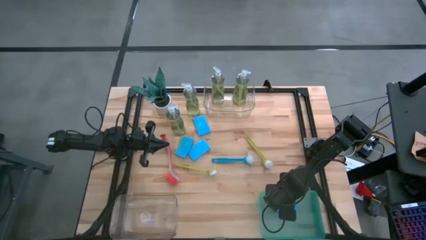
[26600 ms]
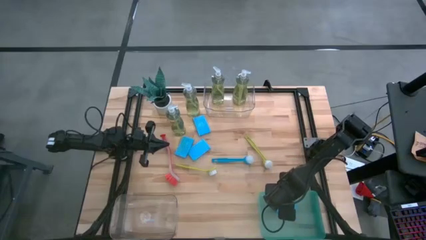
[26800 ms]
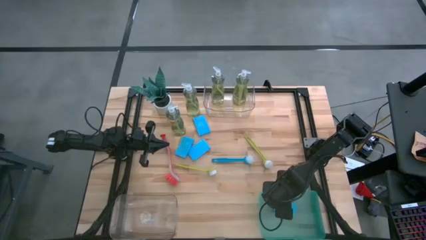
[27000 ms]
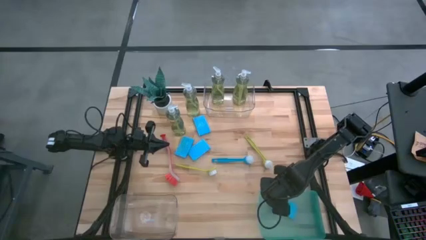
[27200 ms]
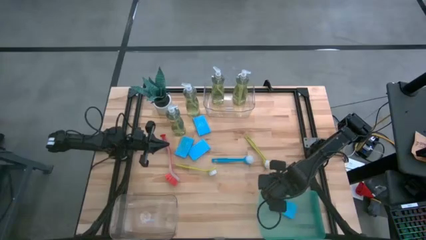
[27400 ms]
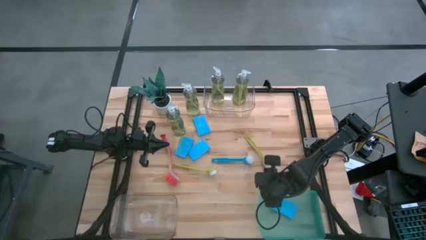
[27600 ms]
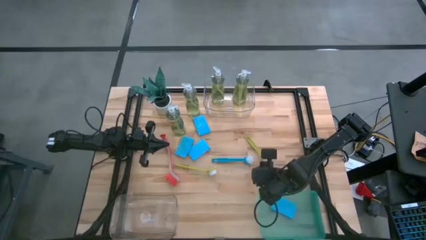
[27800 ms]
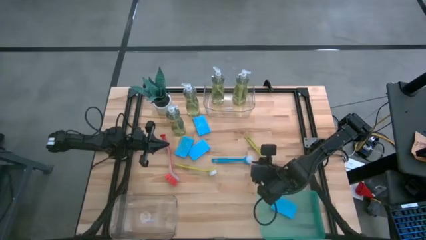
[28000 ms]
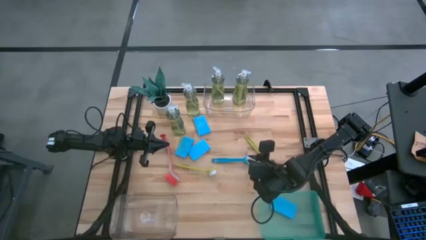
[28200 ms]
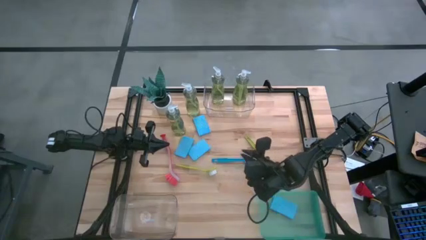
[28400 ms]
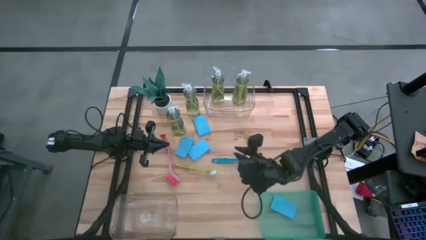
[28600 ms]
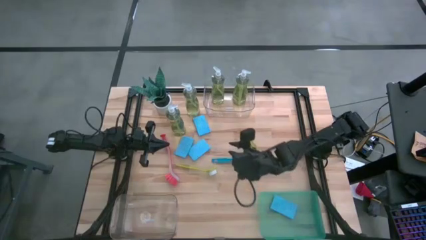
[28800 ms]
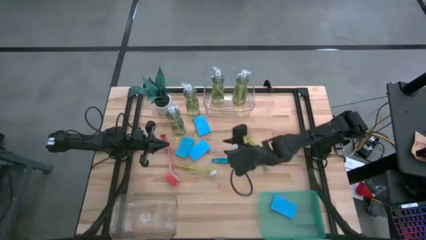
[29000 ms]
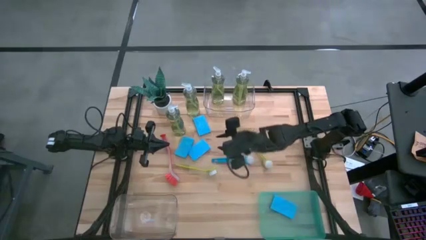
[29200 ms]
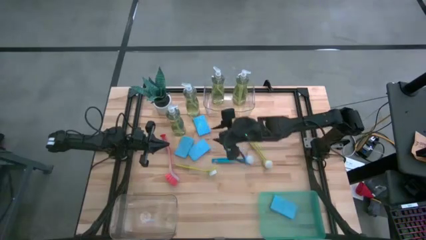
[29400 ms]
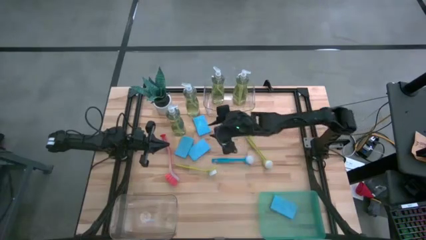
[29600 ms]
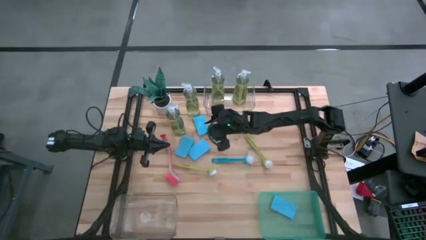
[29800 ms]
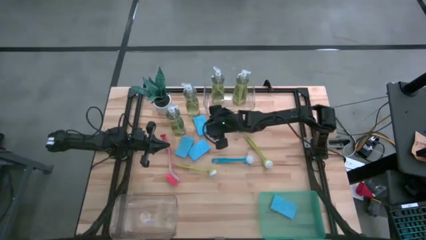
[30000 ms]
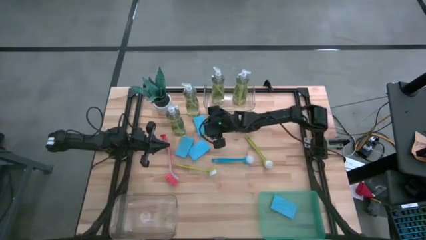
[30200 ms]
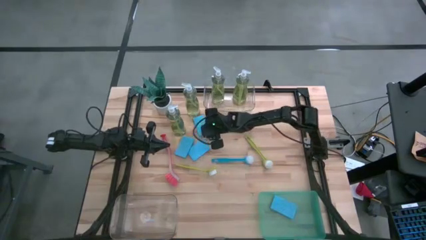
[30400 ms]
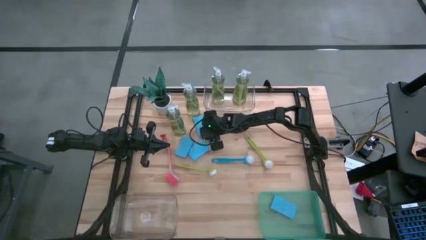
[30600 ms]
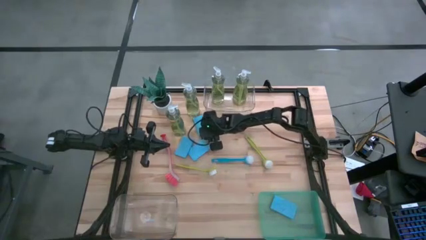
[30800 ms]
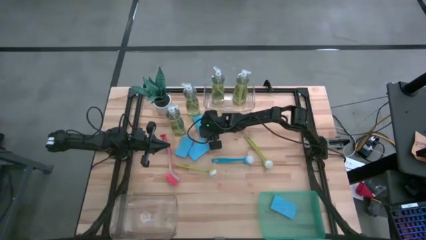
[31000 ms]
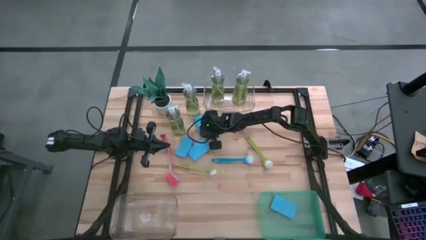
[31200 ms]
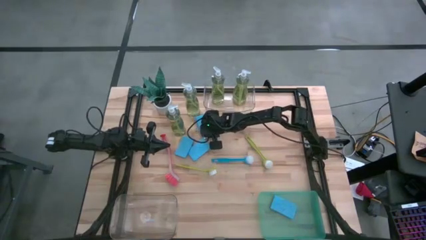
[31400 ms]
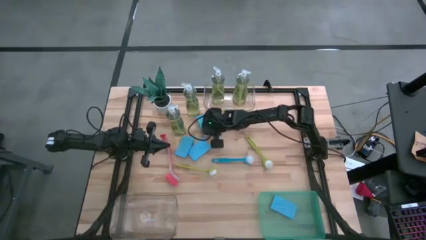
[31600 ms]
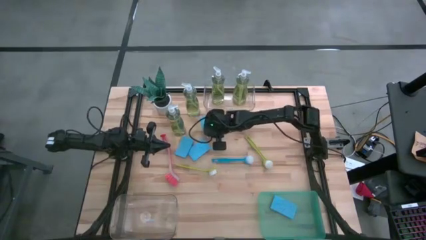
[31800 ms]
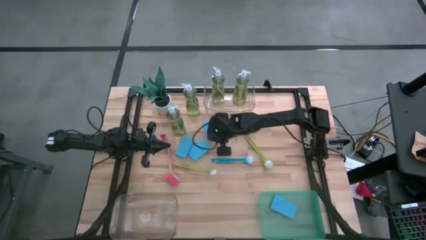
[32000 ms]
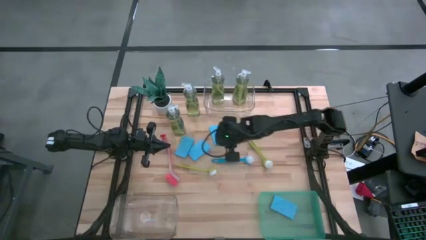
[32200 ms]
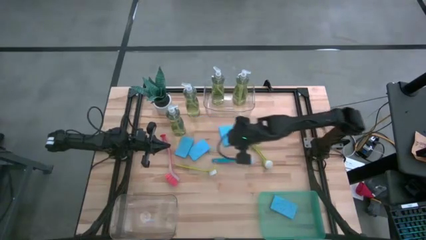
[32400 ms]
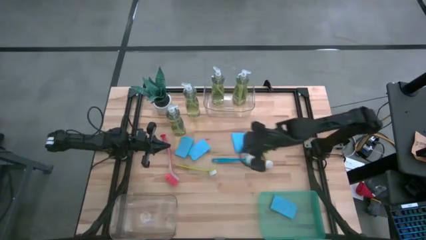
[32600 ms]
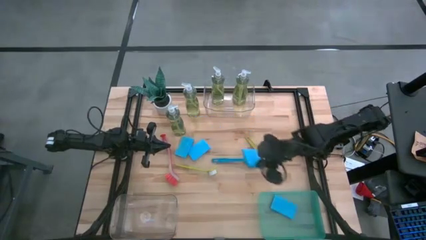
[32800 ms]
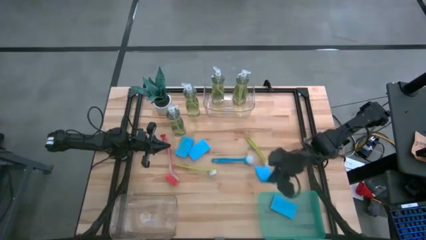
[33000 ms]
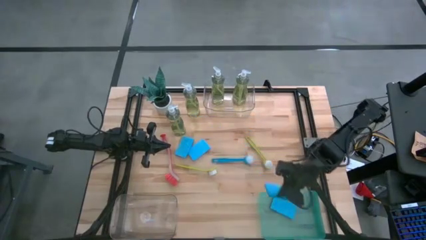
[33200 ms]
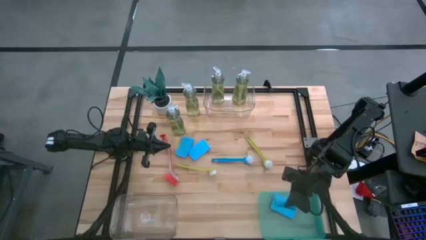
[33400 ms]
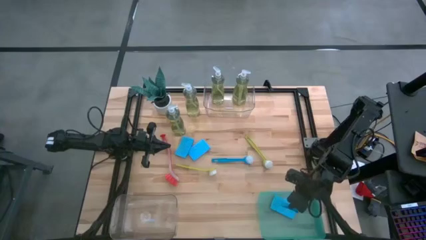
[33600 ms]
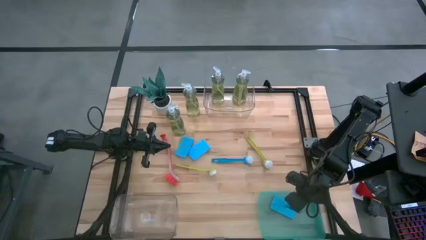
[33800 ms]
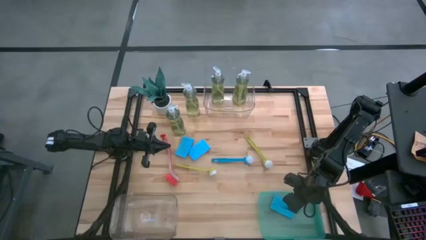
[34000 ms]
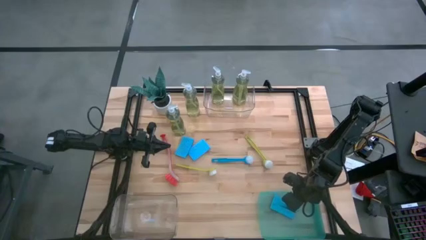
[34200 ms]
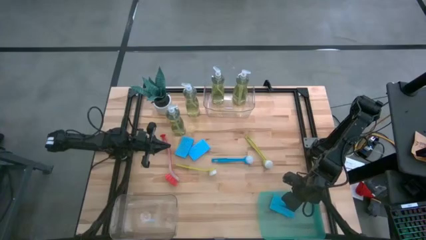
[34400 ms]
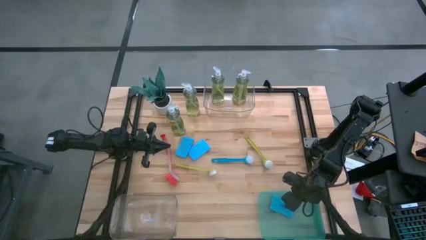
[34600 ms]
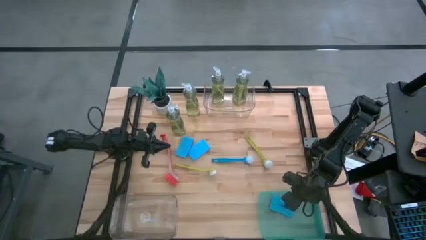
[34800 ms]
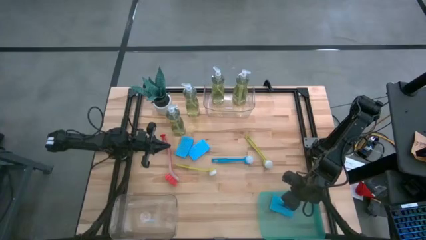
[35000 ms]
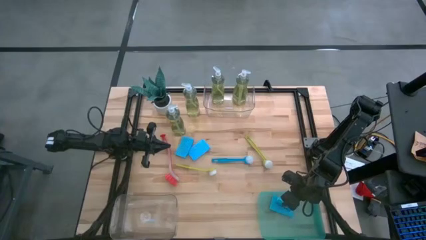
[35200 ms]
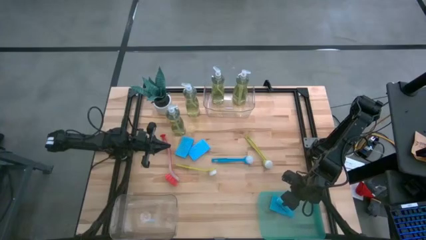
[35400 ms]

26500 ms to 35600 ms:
Task: Pick & Place Kitchen Sink Supplies
Put the blue sponge into the green bin

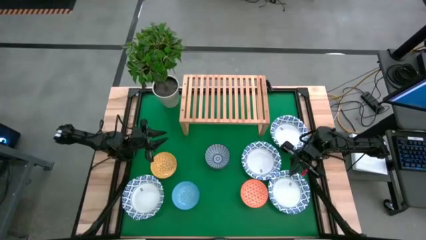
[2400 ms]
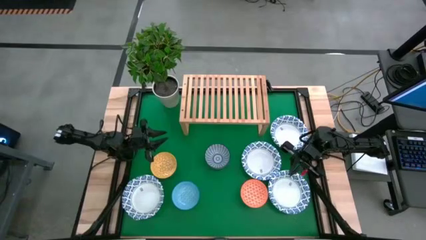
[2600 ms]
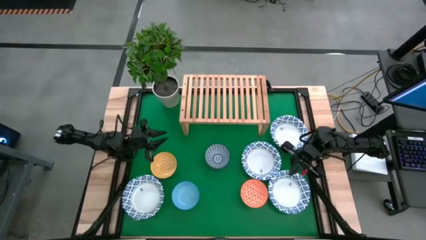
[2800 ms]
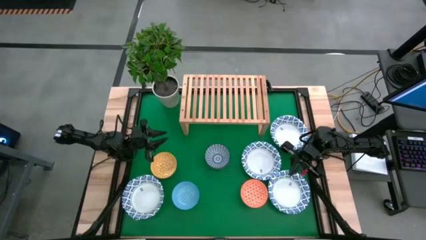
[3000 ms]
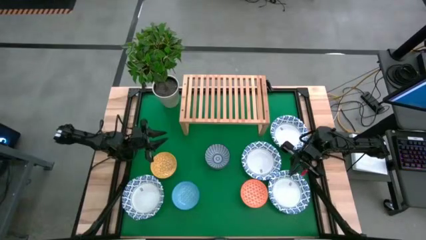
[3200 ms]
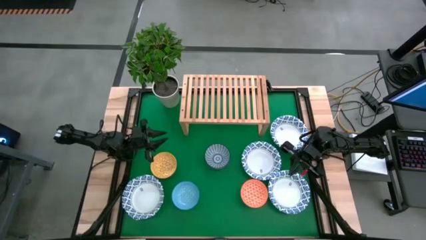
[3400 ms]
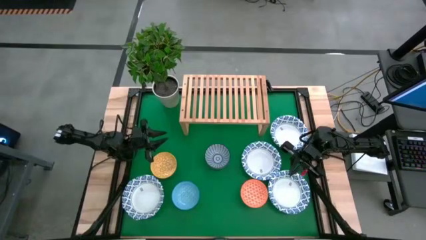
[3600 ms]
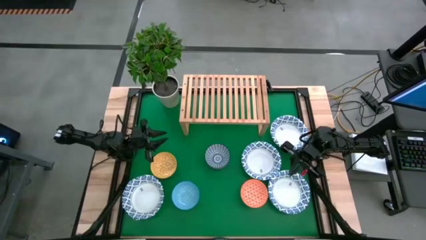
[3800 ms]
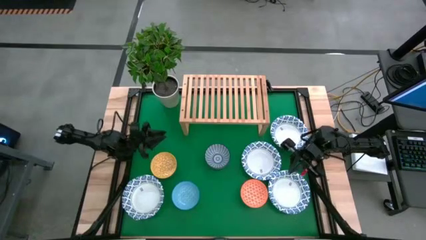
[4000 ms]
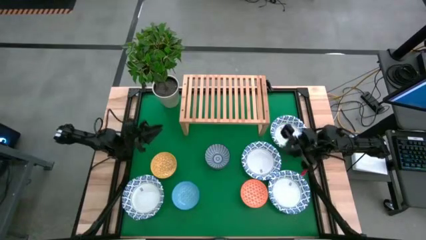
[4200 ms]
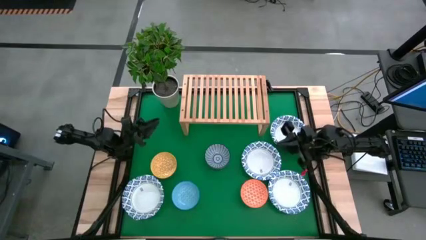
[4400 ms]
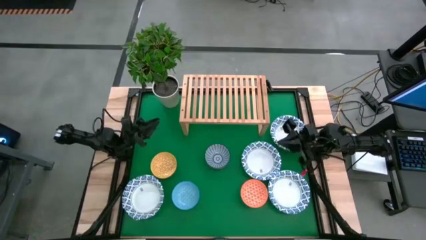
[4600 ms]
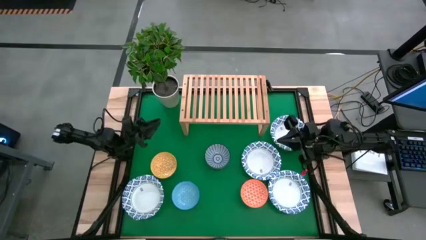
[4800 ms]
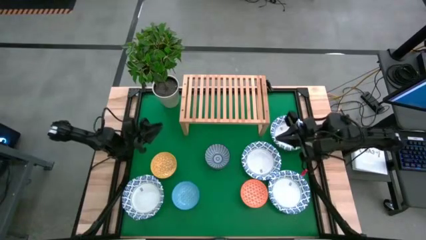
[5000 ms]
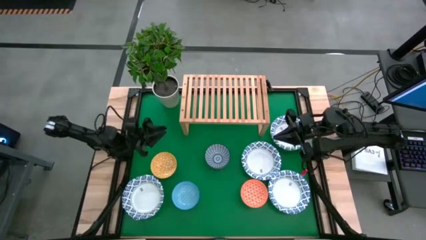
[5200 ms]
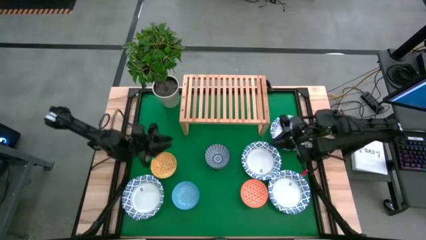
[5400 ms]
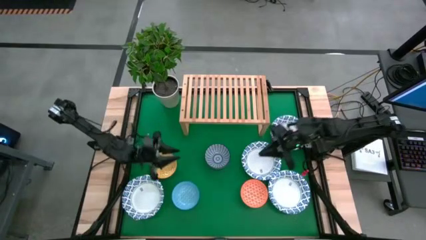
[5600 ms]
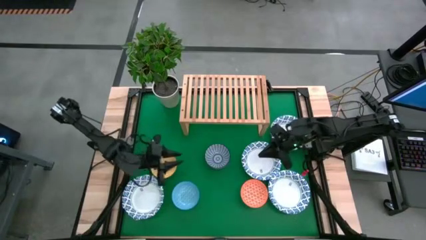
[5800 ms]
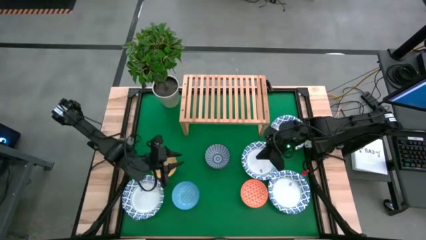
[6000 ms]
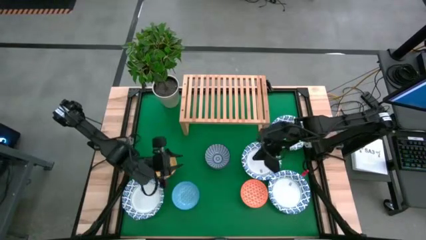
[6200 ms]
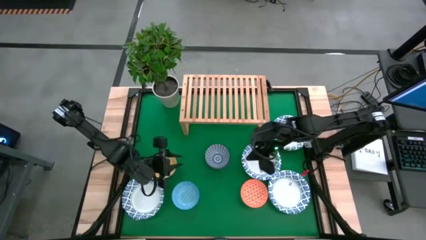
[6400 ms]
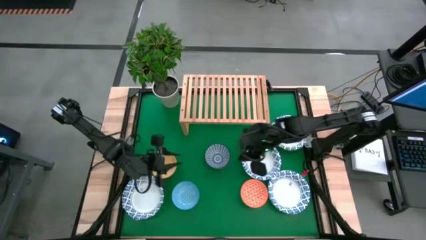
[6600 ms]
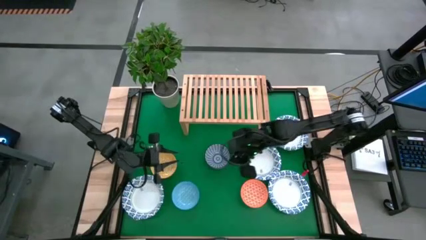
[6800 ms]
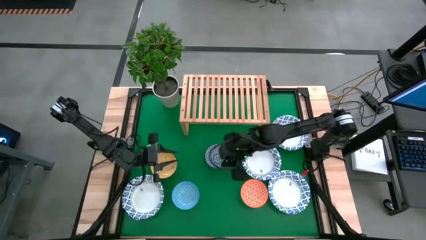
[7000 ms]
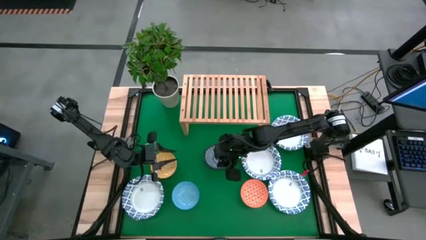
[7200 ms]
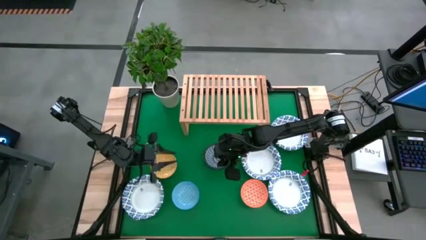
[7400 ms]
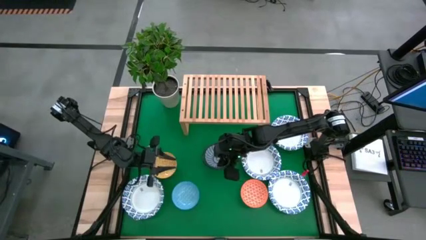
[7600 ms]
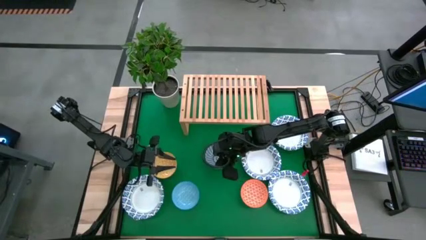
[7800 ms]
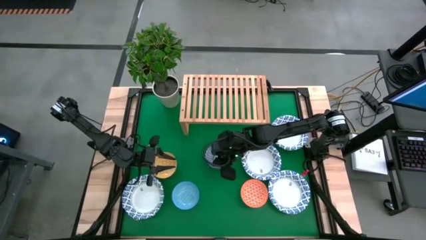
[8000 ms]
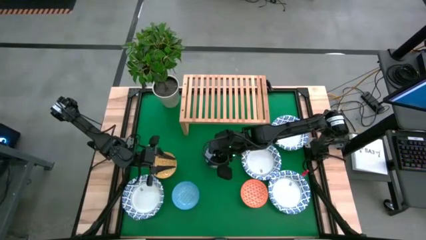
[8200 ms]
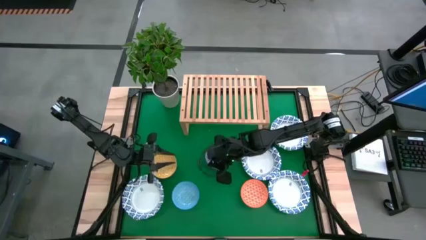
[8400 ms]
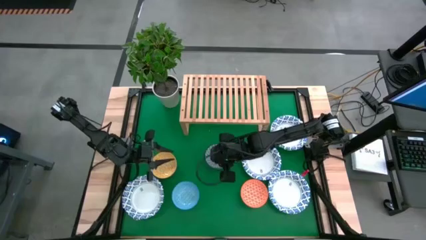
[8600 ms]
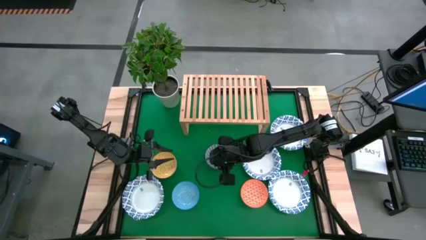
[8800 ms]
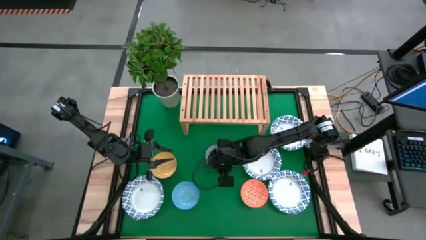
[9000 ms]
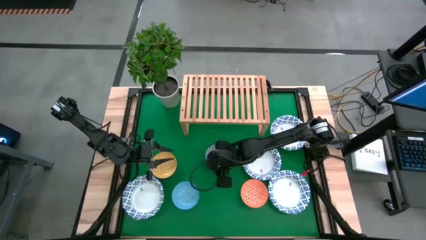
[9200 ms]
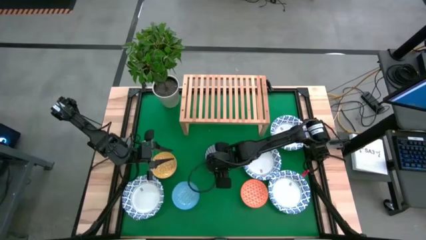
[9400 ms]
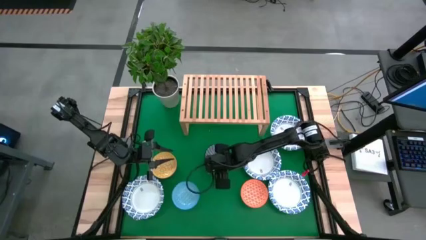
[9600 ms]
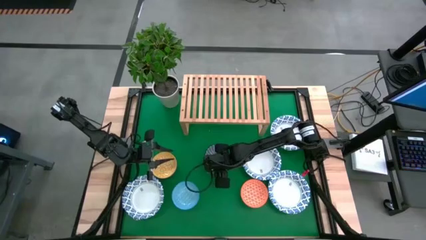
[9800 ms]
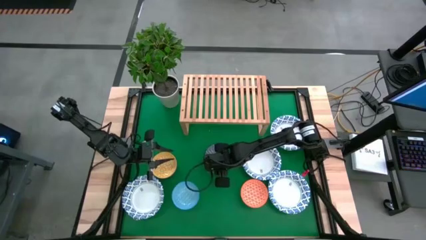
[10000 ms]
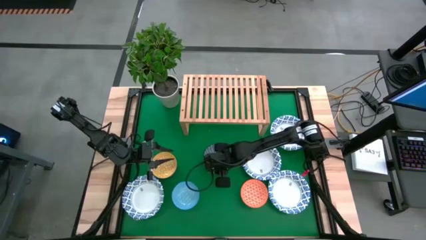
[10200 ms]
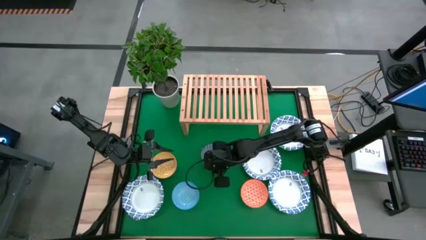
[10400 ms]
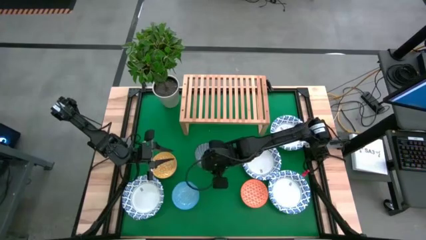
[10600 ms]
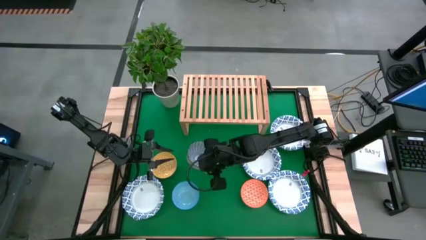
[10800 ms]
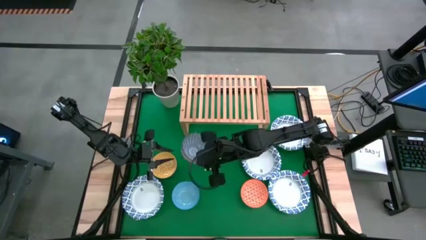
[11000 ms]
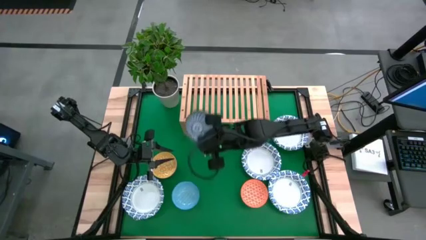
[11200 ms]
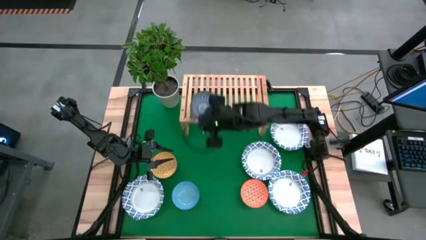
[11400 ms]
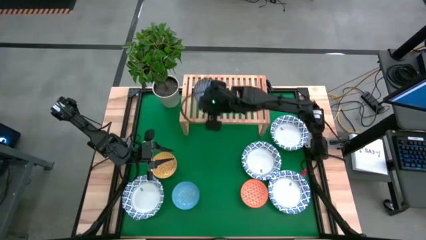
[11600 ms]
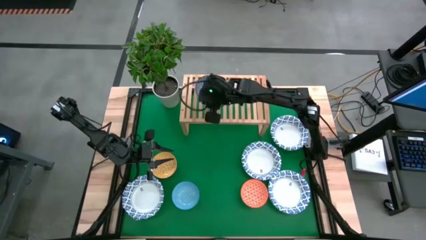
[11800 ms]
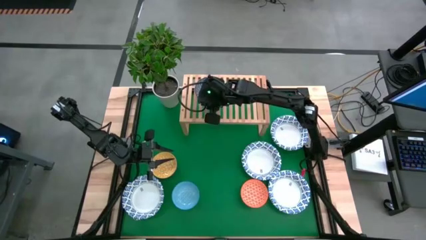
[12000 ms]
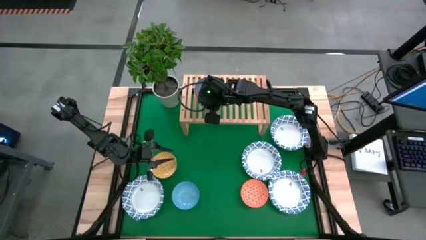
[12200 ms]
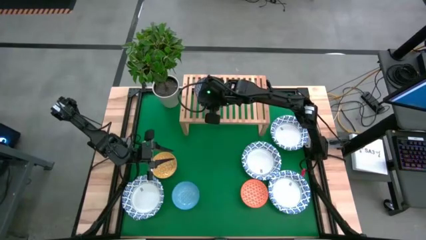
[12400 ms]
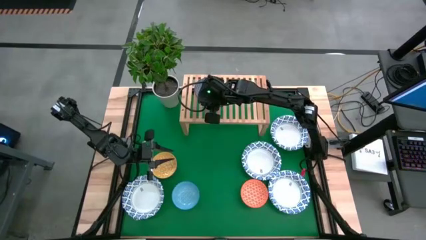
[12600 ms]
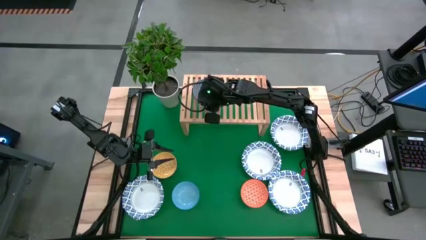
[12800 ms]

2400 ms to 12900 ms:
Task: Place and stack bowls onto a shelf
Put the blue bowl on the shelf
